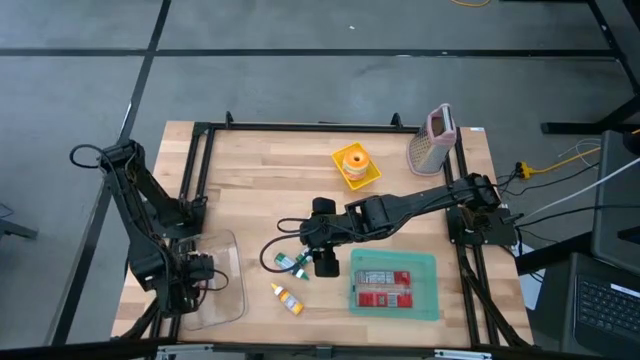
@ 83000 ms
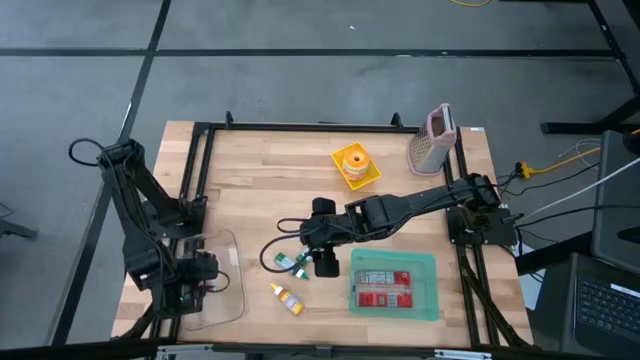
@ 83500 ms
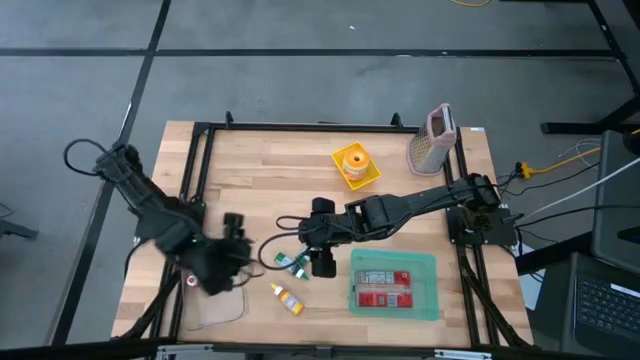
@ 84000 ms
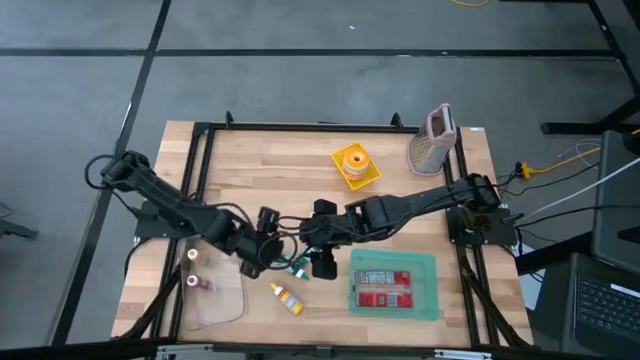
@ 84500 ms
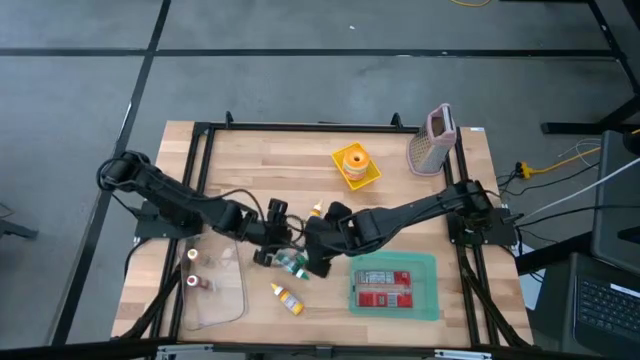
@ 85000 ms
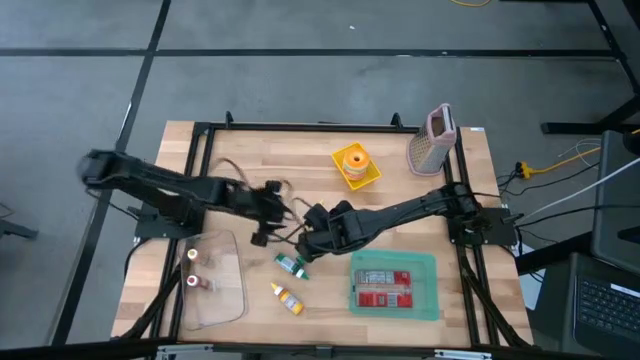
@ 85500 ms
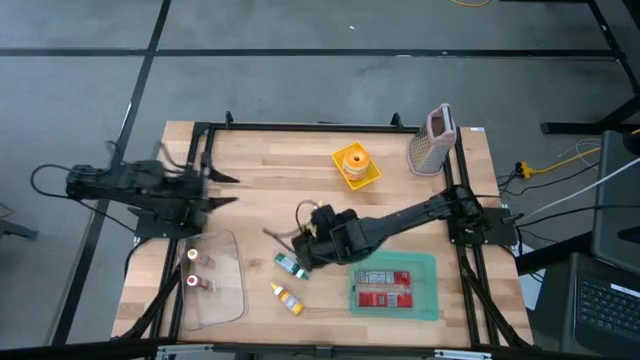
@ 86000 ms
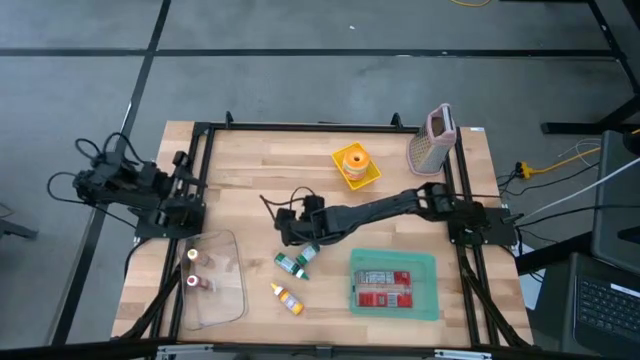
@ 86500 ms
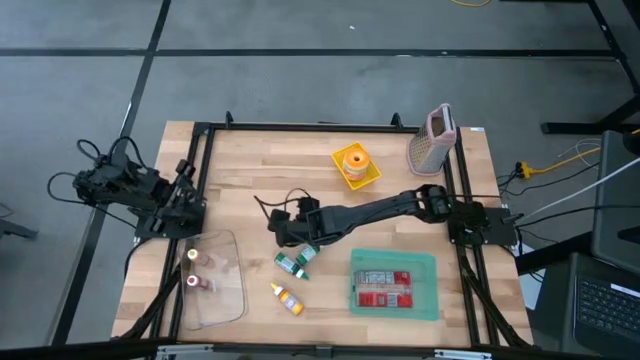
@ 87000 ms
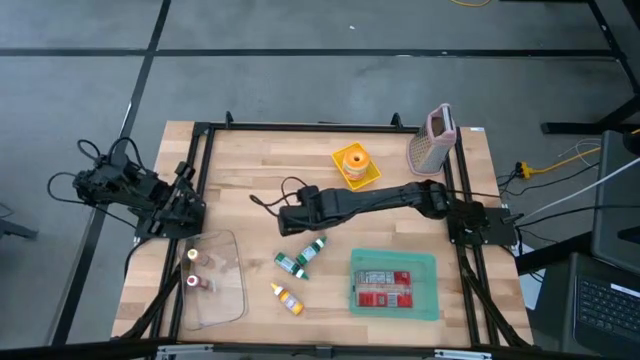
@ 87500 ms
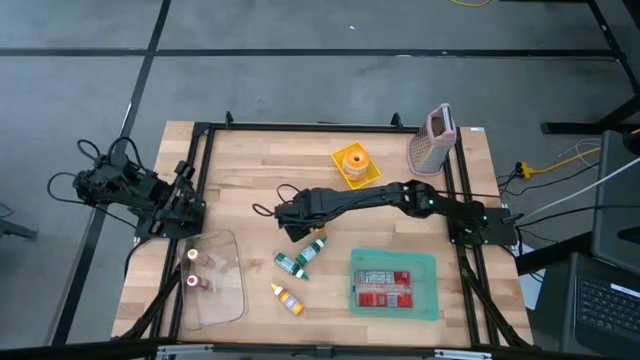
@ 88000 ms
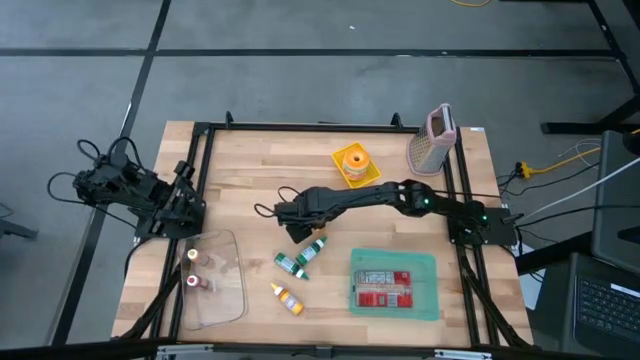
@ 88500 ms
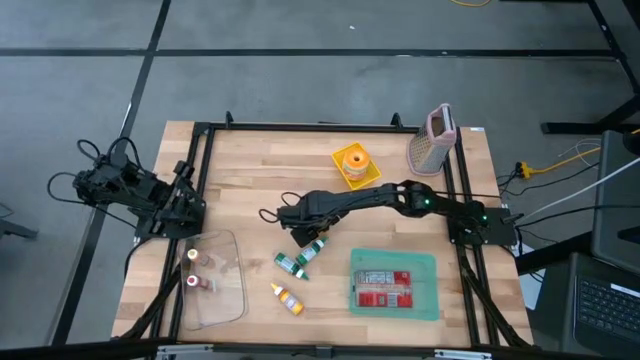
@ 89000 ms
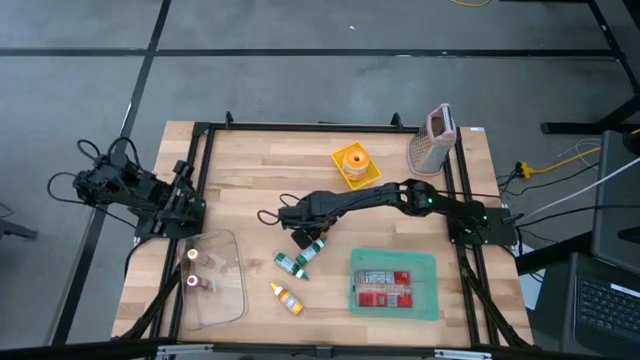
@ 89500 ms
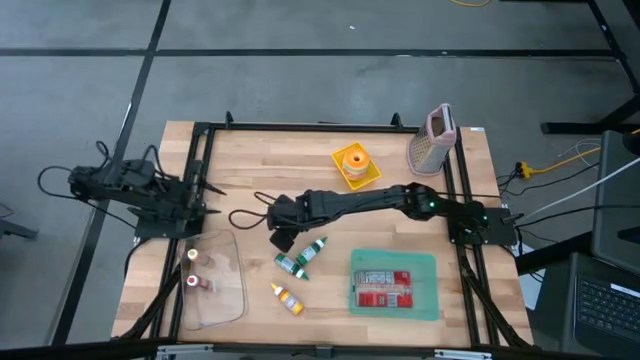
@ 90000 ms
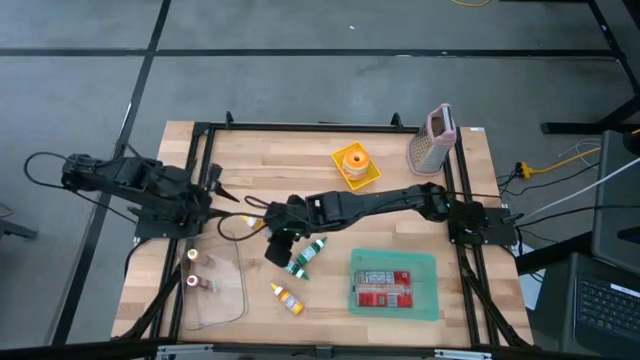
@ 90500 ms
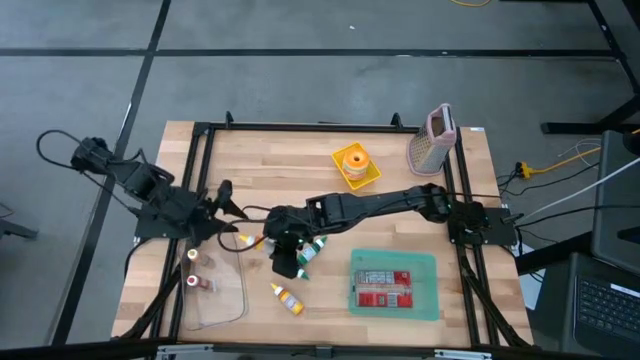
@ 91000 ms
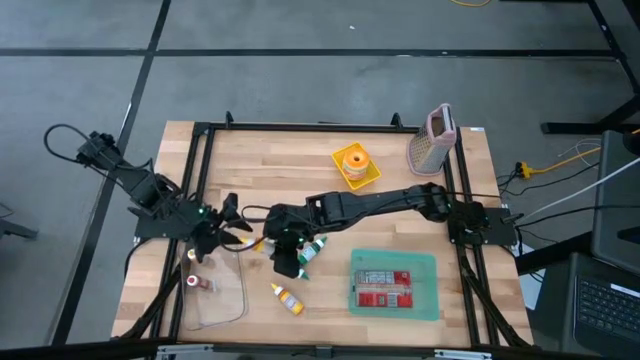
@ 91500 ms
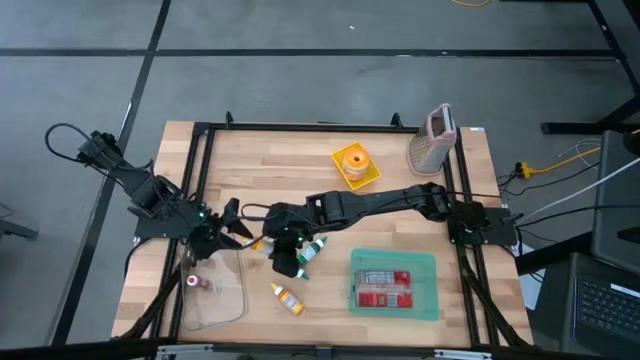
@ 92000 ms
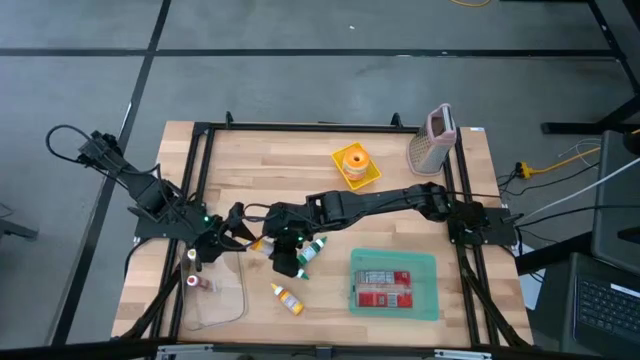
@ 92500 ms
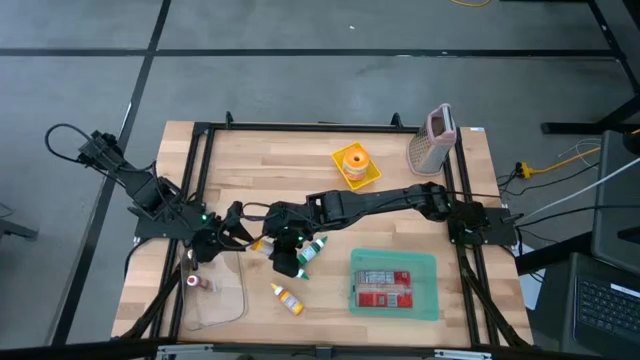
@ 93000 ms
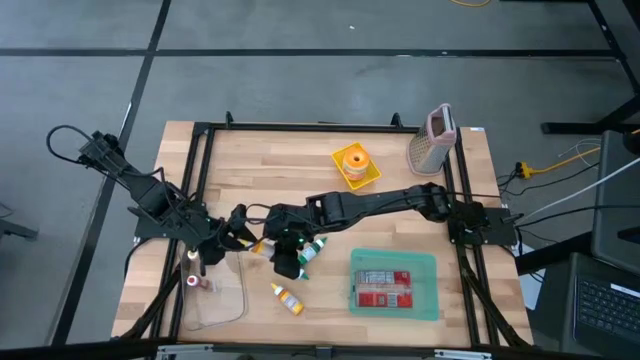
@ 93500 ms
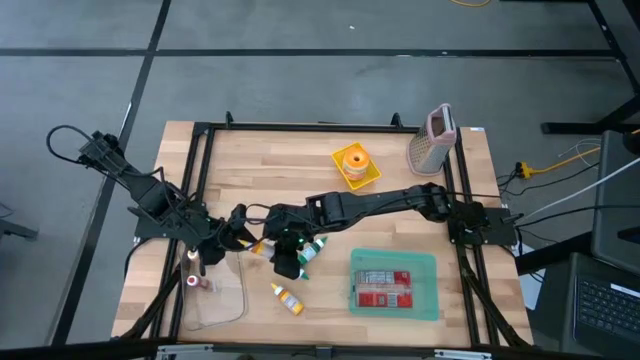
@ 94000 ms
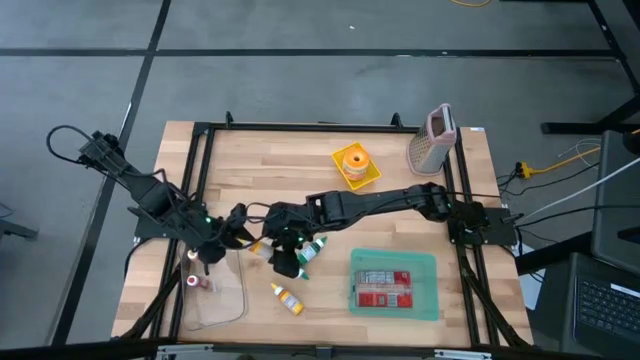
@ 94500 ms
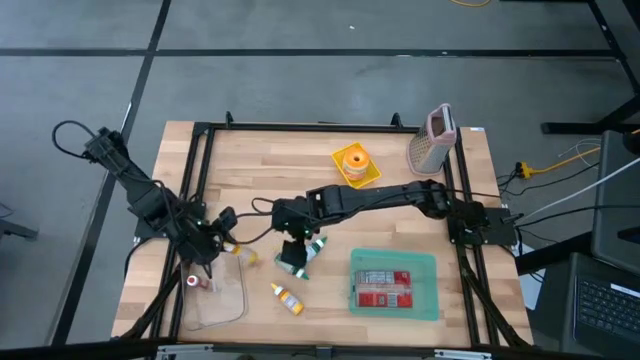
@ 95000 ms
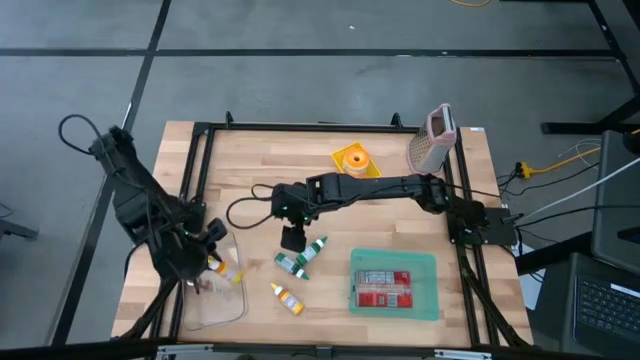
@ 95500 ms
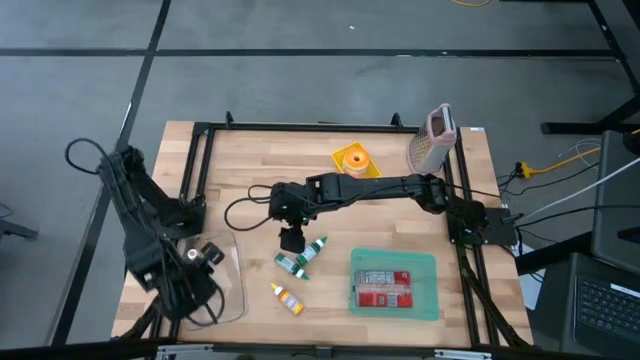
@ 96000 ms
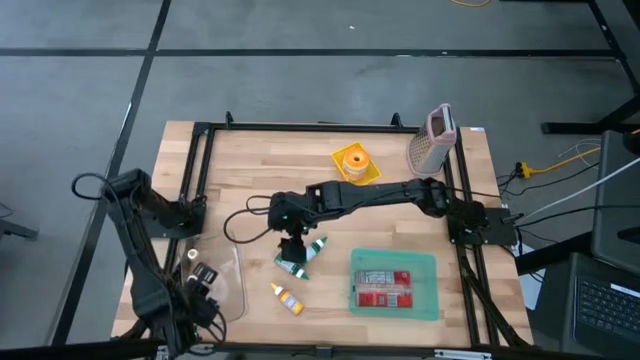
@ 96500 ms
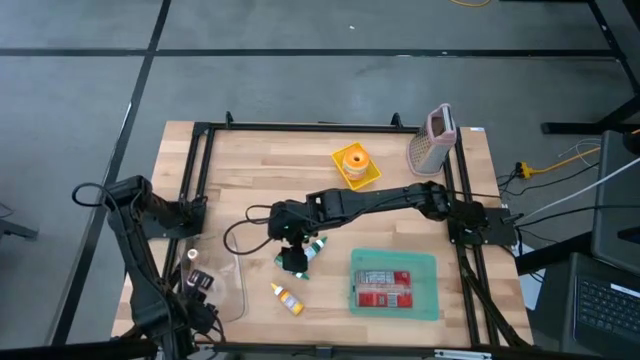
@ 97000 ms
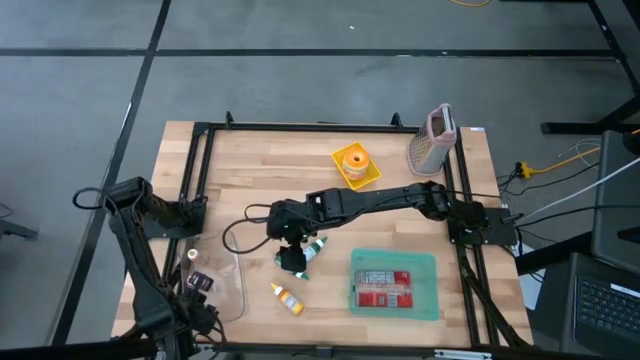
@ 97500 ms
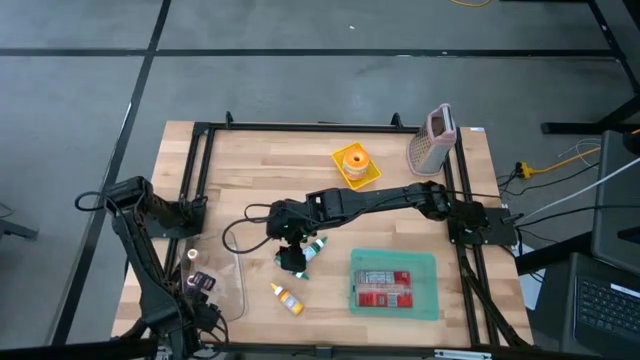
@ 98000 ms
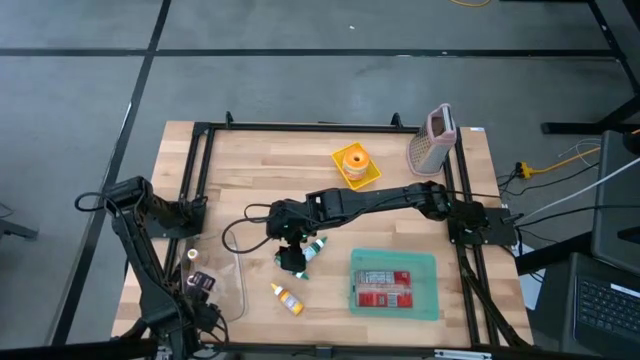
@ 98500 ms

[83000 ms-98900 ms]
Put the top yellow food coloring bottle into the transparent bin
